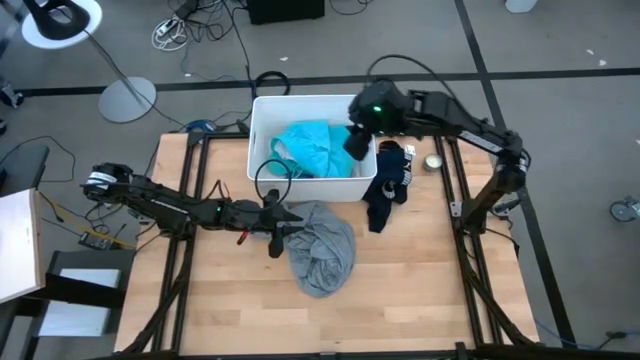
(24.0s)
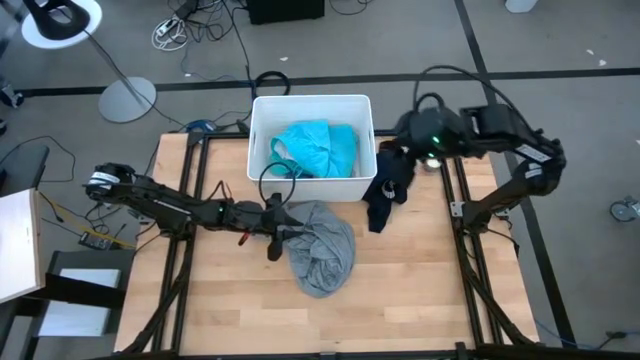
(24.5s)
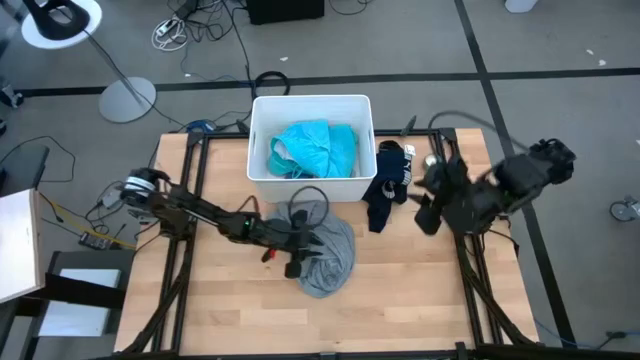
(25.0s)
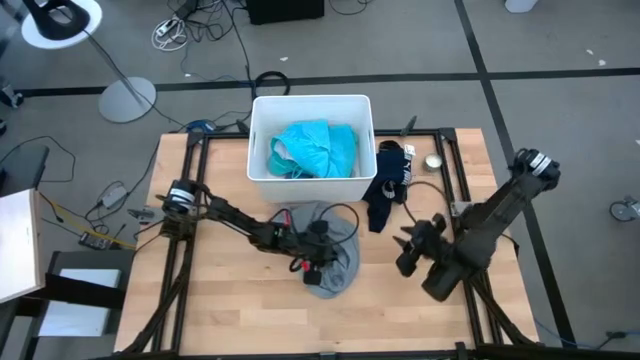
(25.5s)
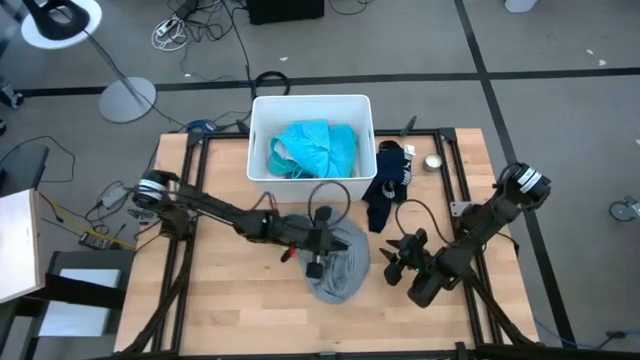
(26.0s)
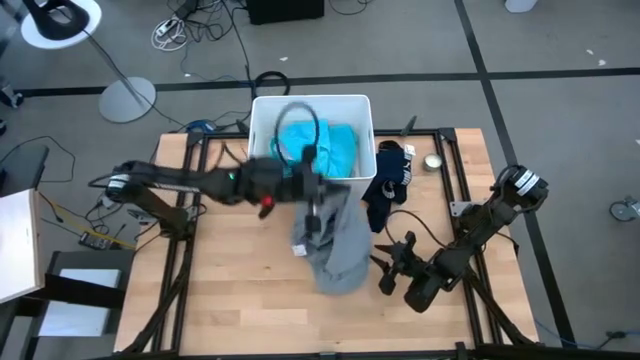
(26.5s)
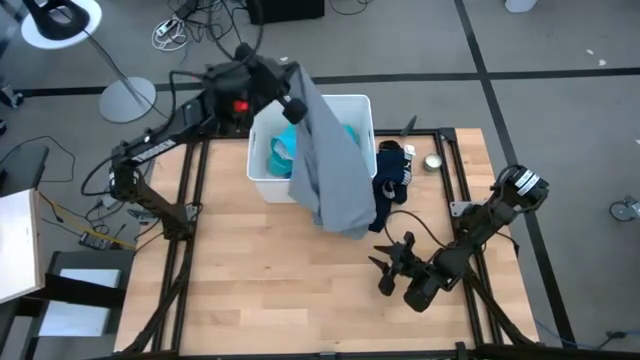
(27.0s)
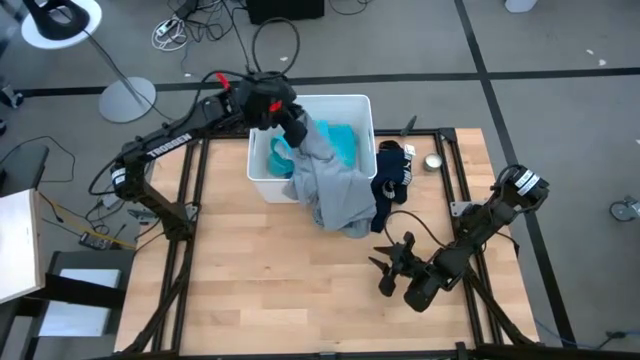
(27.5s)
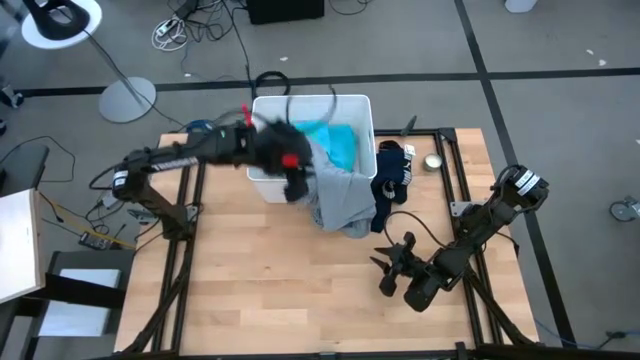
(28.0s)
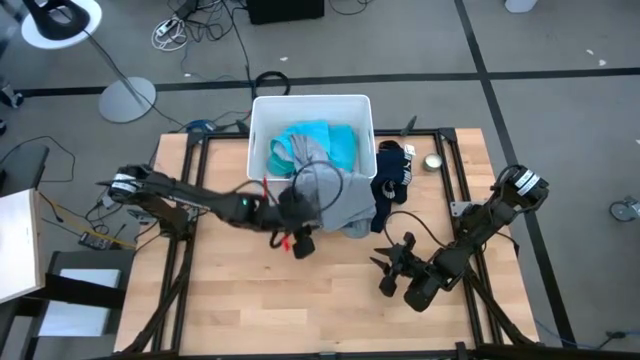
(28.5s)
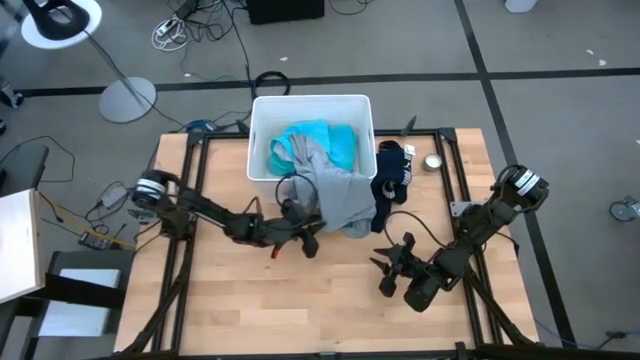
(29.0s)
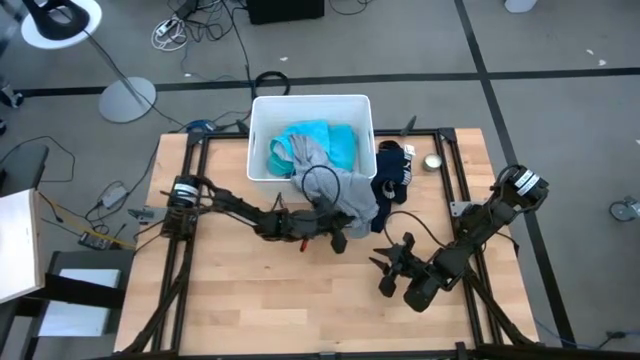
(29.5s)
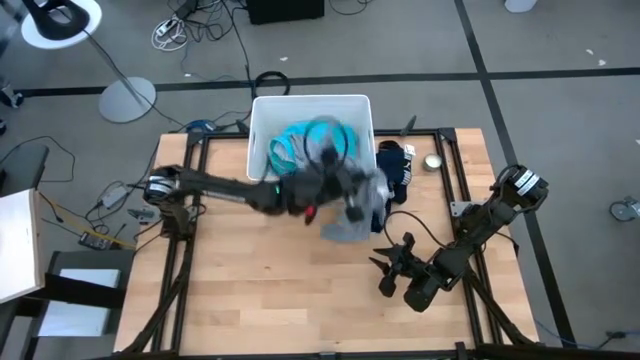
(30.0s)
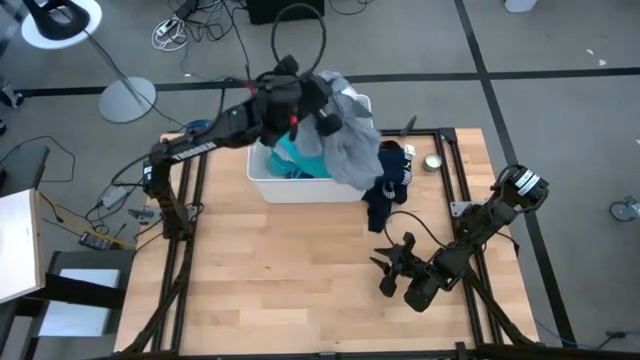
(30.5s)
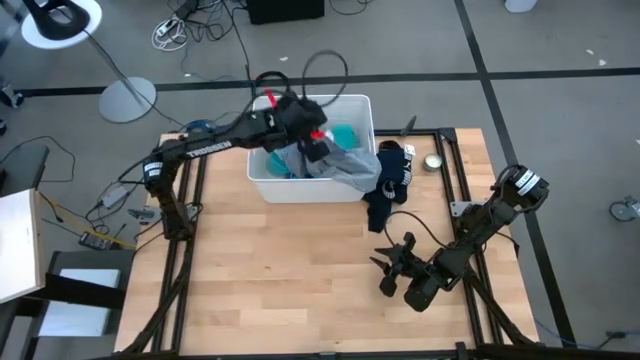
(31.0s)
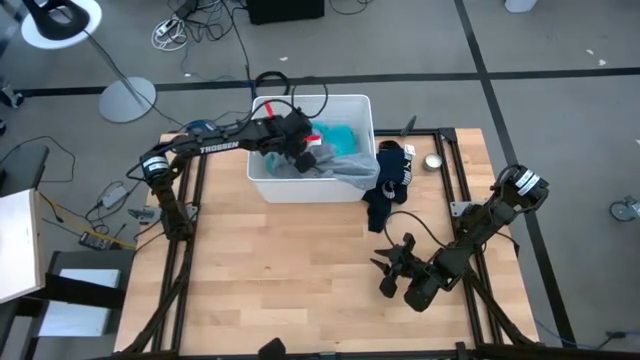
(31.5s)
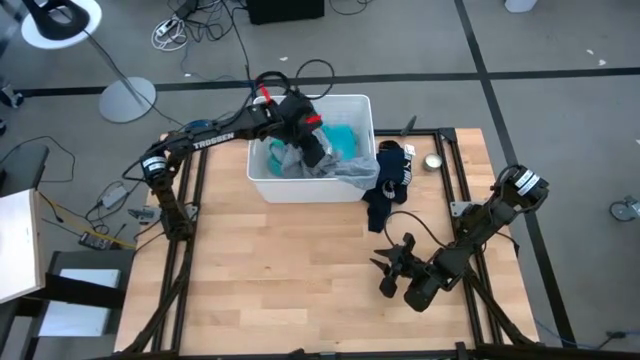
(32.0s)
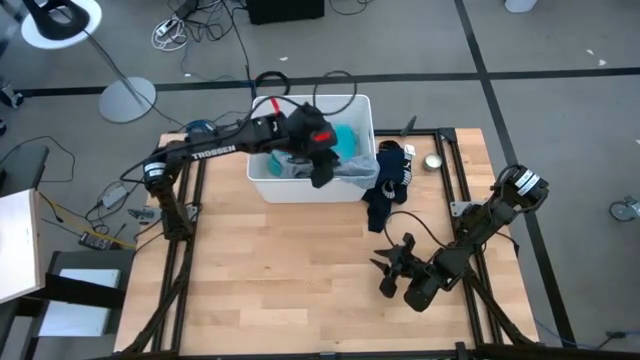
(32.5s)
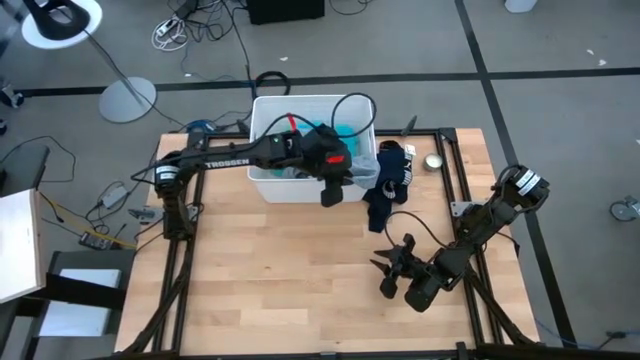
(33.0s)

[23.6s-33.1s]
Task: Sort clothes
Put the gray sweatshirt into the white laundry bin

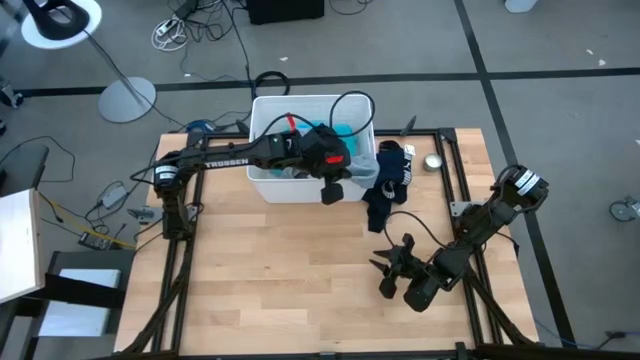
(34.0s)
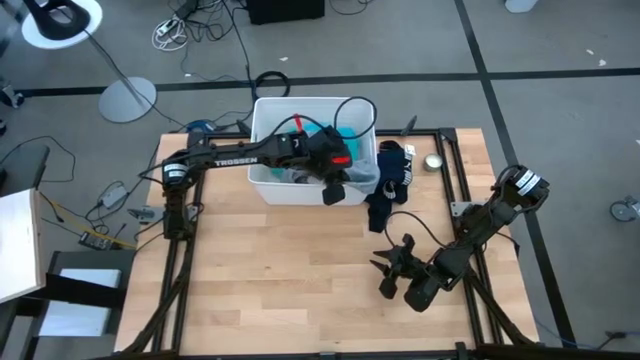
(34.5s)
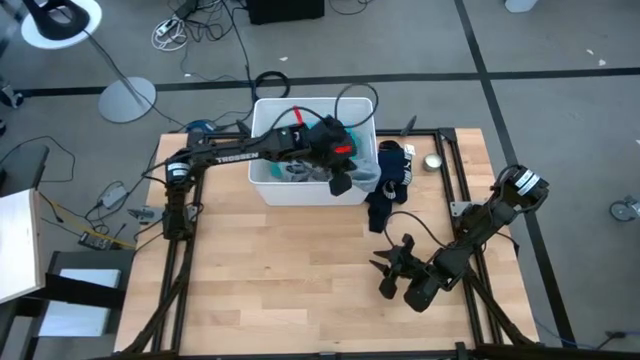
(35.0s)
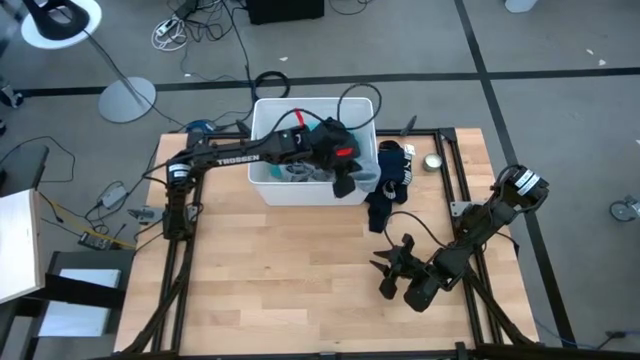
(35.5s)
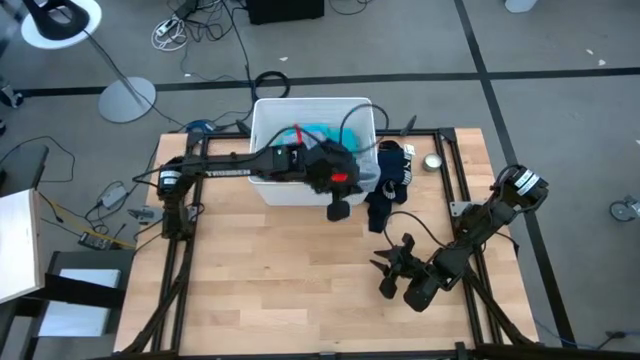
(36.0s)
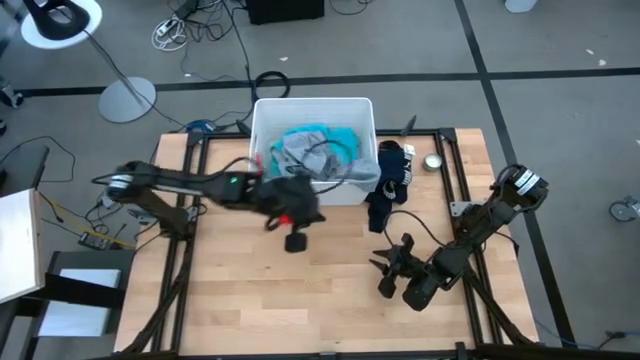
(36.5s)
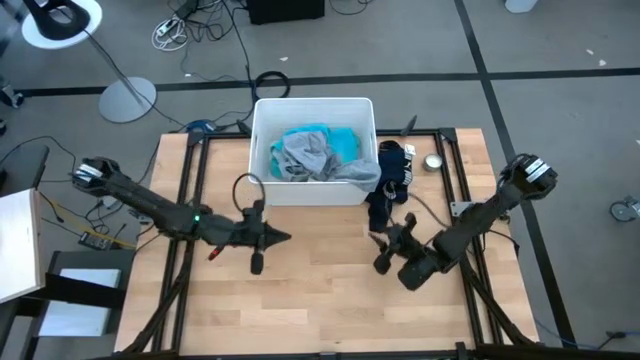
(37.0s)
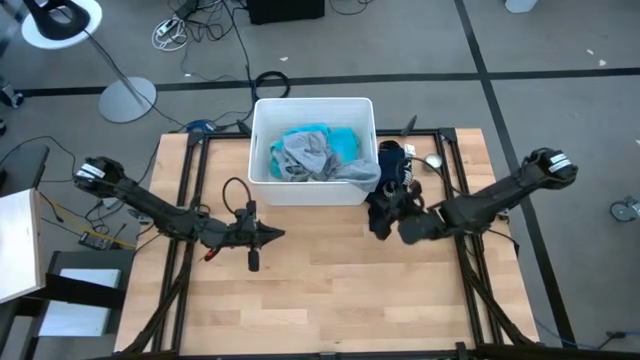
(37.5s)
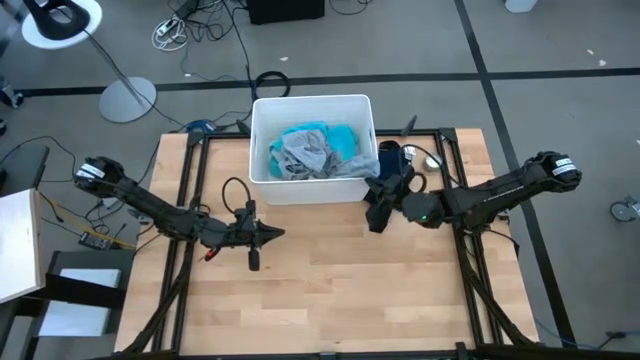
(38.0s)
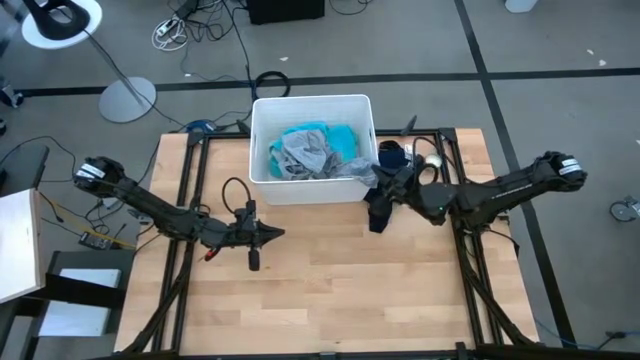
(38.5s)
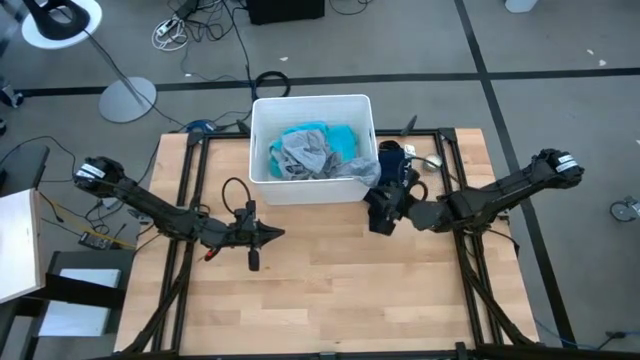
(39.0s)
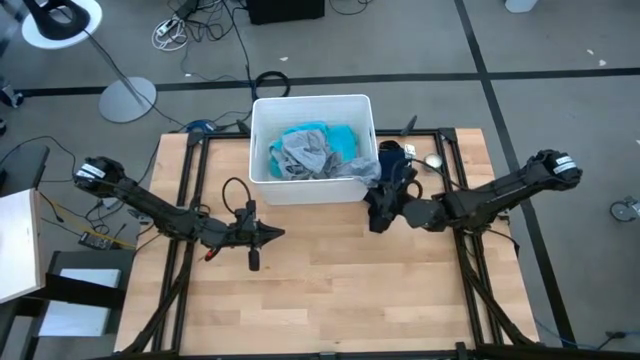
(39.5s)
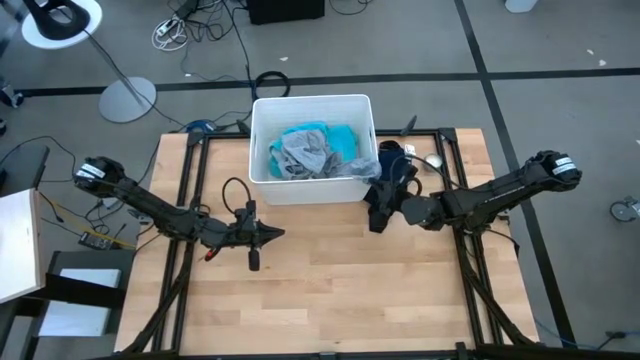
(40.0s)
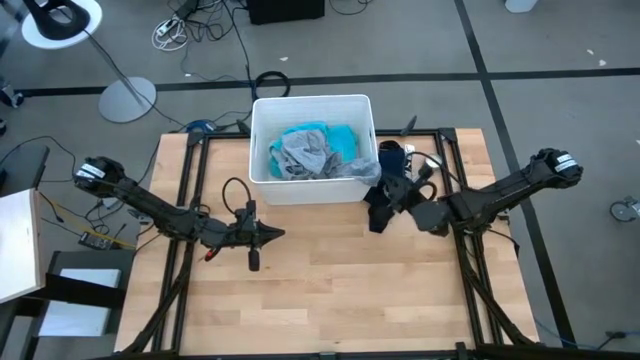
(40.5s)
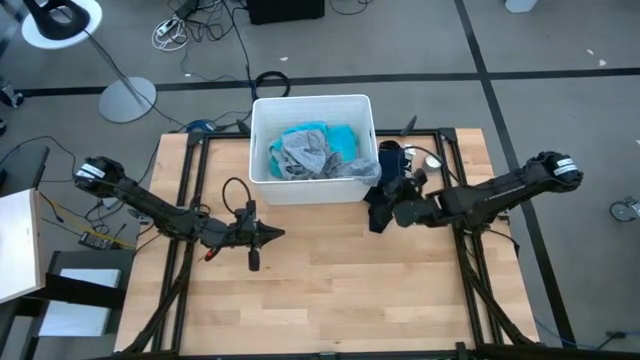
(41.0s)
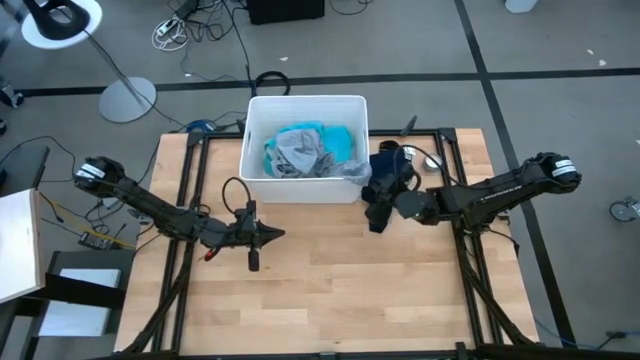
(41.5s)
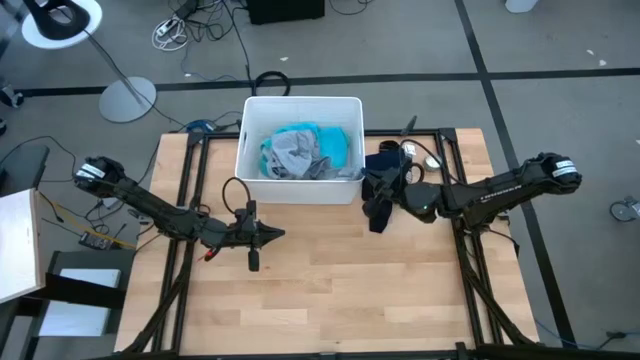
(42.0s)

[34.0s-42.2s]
Put the gray sweatshirt into the white laundry bin

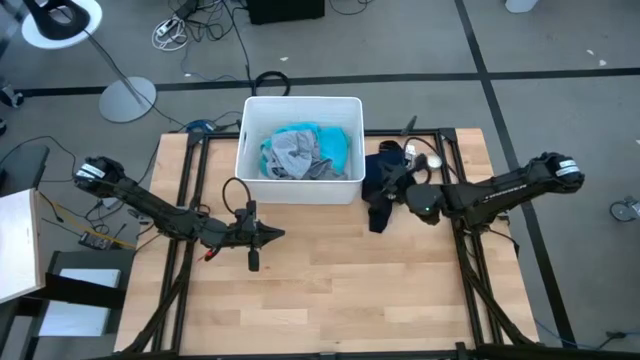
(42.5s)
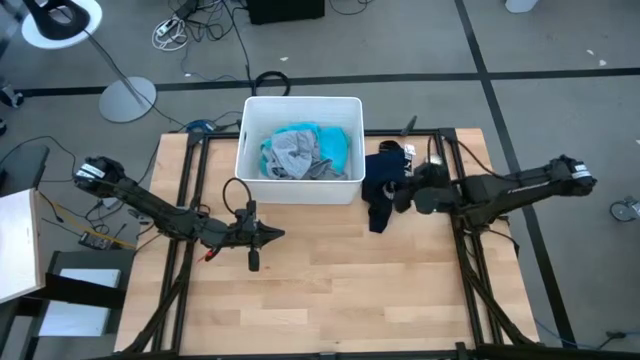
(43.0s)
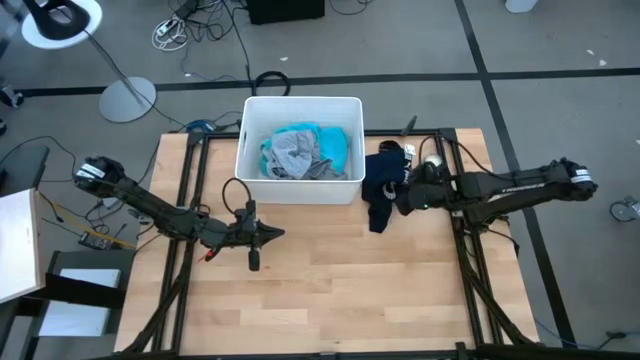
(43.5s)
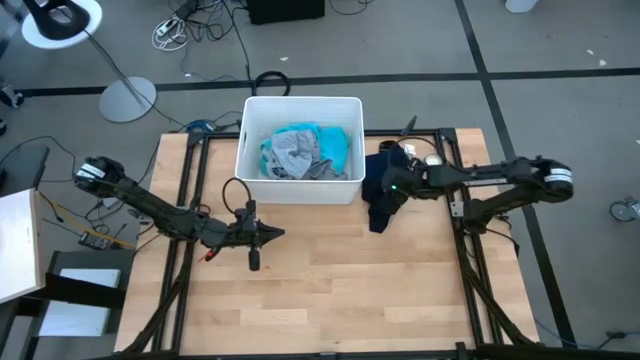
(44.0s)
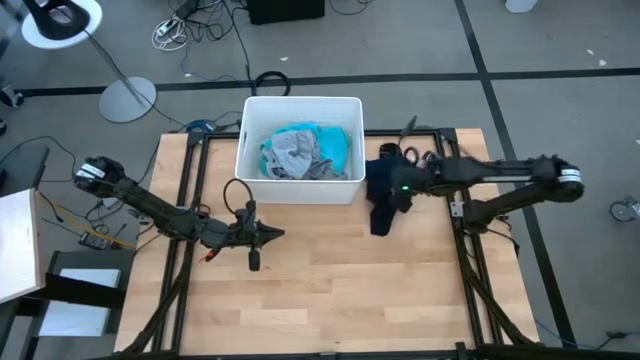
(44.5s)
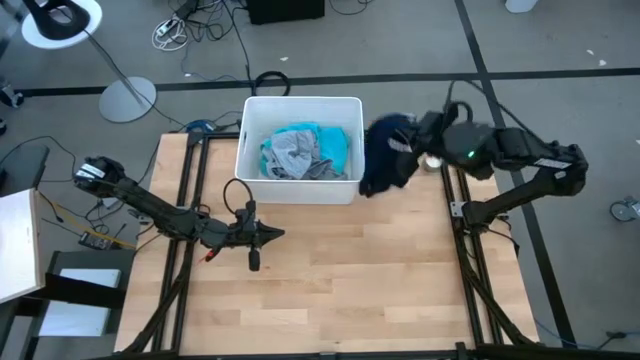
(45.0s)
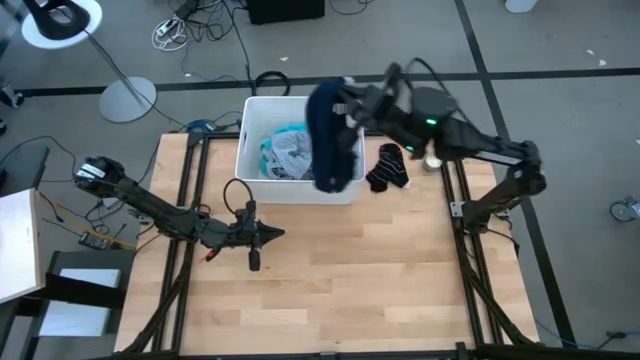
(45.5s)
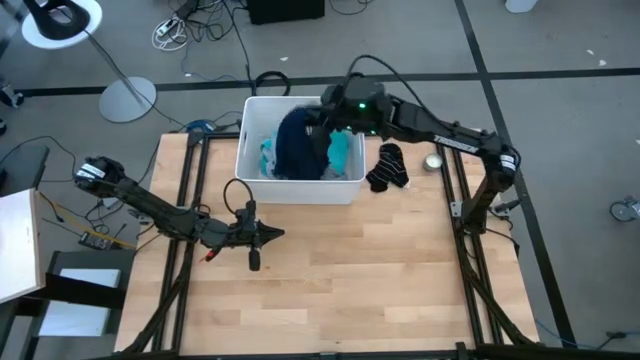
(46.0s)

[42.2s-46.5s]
Put the blue underwear into the white laundry bin

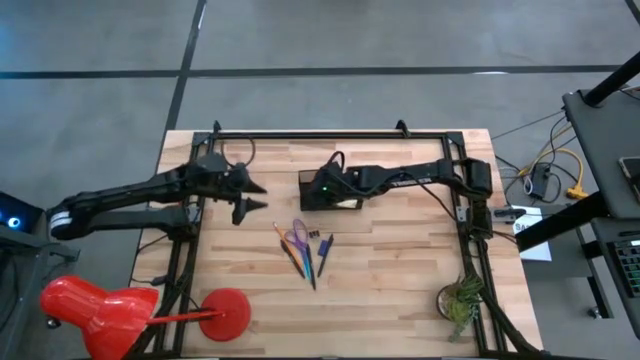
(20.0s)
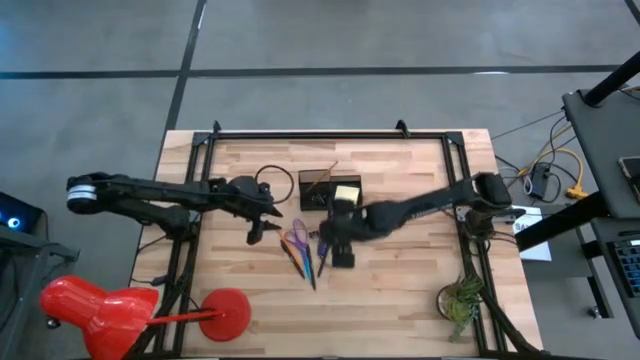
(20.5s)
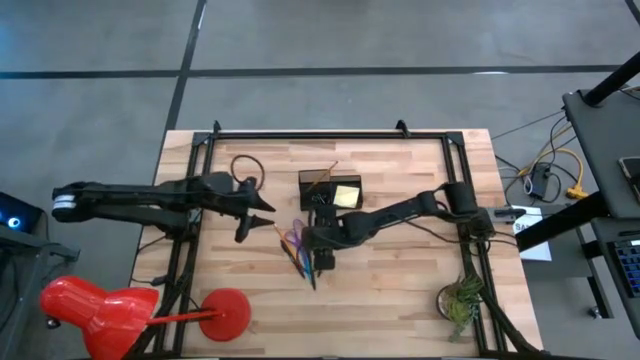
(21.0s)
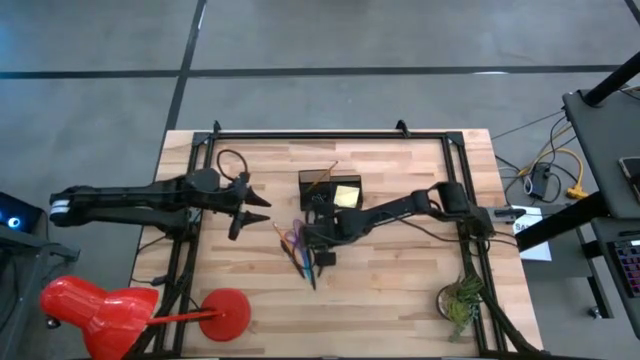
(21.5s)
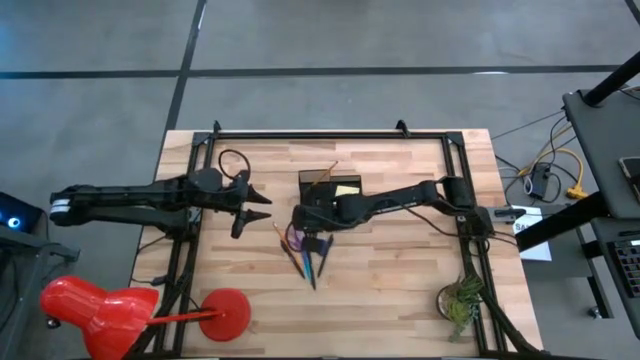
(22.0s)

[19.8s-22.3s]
Task: Pick and place office supplies into organizer
Put the black binder clip into the black desk organizer
